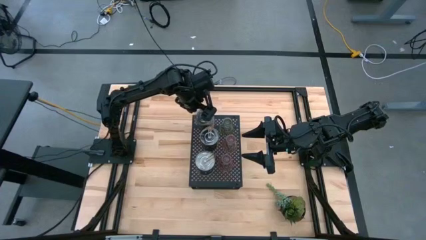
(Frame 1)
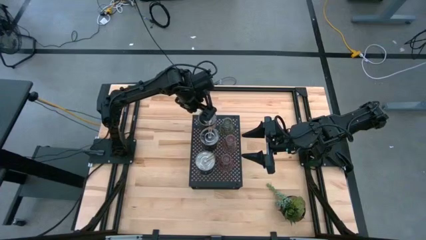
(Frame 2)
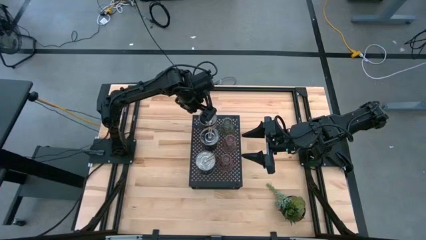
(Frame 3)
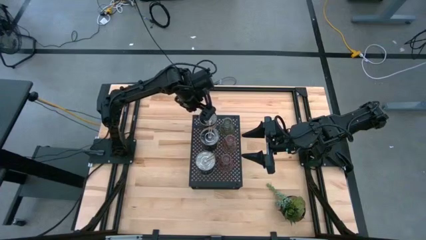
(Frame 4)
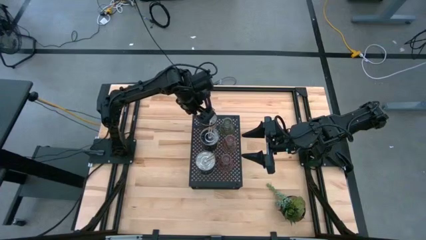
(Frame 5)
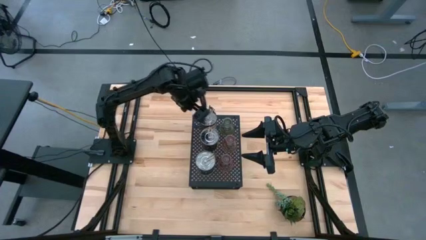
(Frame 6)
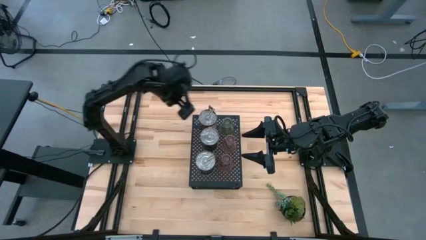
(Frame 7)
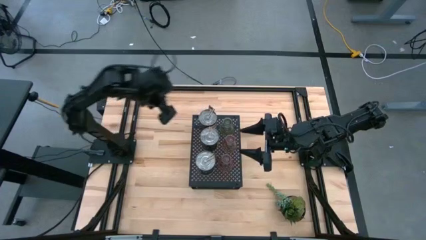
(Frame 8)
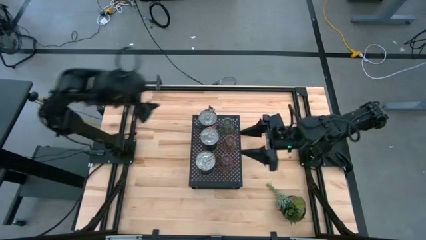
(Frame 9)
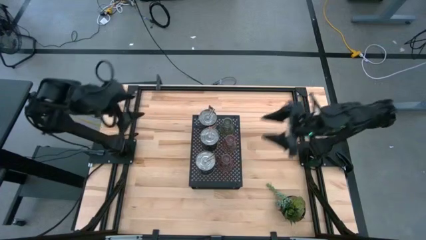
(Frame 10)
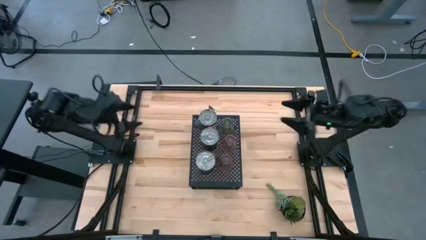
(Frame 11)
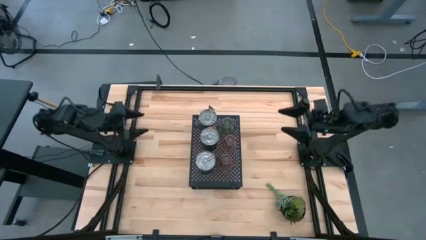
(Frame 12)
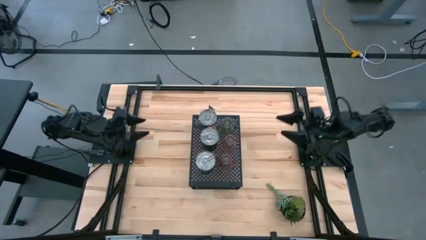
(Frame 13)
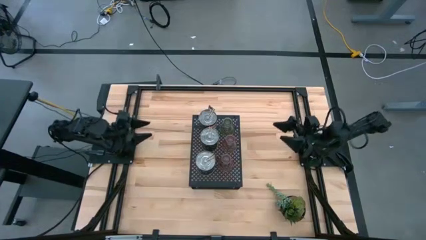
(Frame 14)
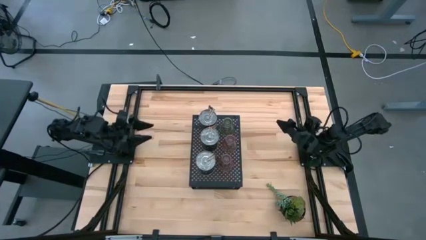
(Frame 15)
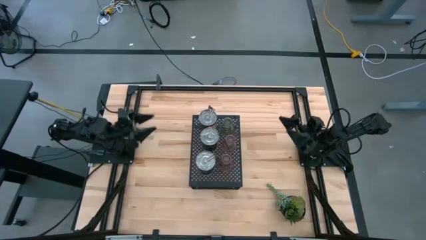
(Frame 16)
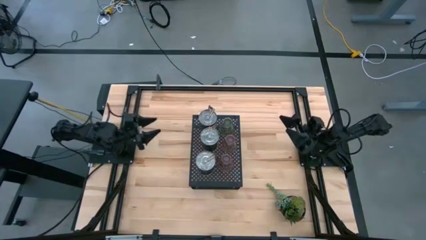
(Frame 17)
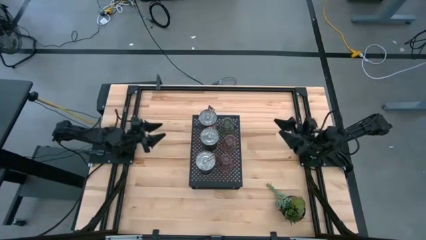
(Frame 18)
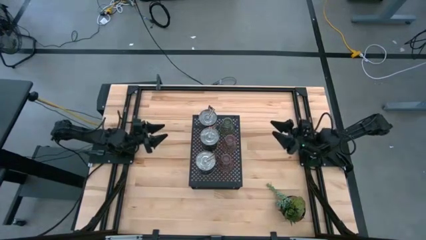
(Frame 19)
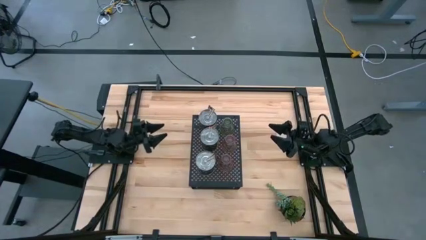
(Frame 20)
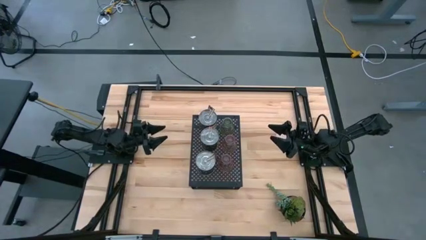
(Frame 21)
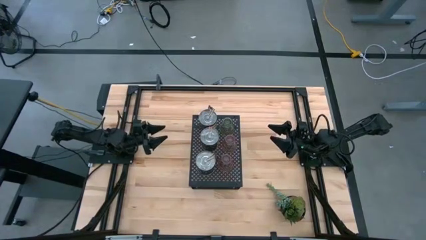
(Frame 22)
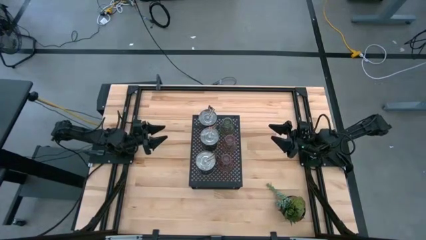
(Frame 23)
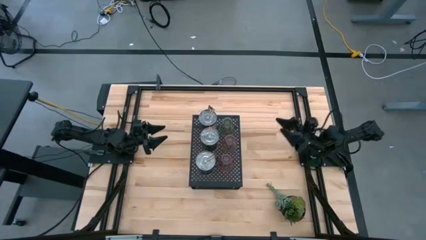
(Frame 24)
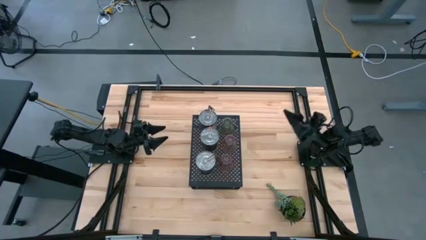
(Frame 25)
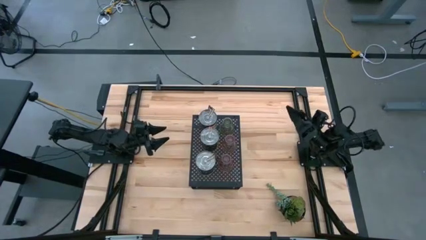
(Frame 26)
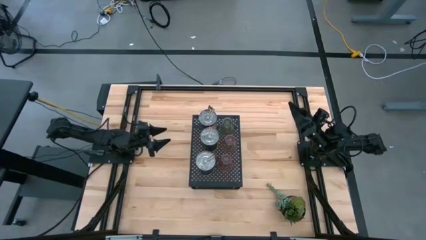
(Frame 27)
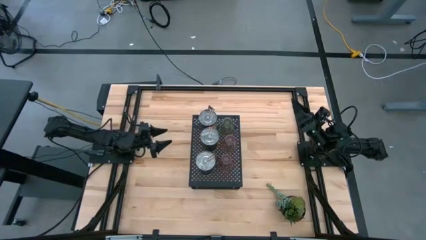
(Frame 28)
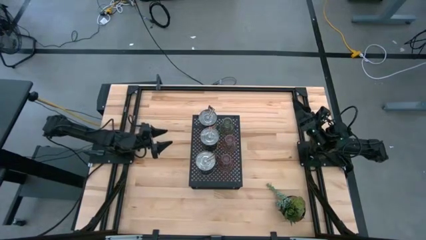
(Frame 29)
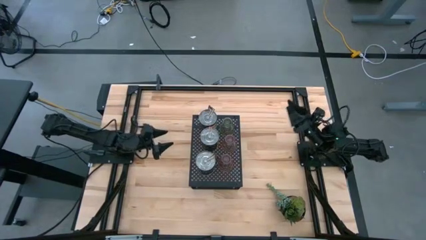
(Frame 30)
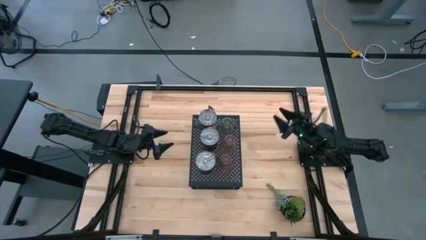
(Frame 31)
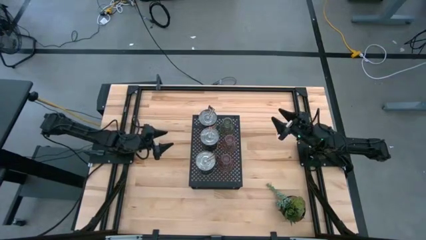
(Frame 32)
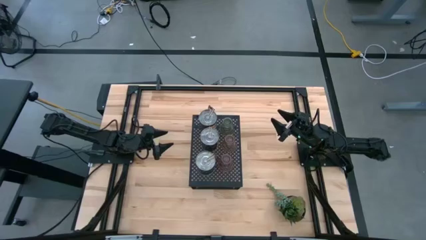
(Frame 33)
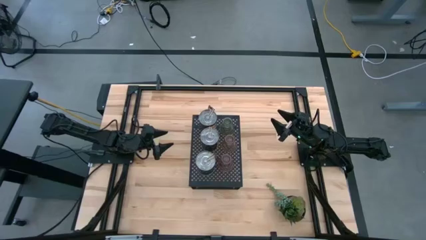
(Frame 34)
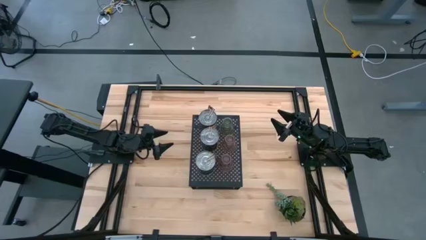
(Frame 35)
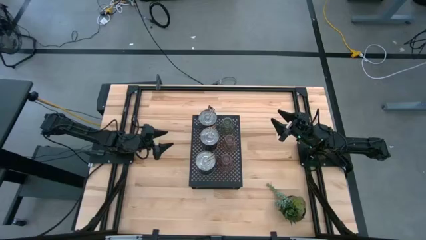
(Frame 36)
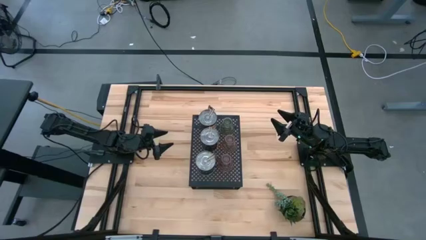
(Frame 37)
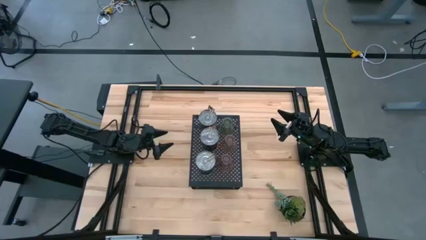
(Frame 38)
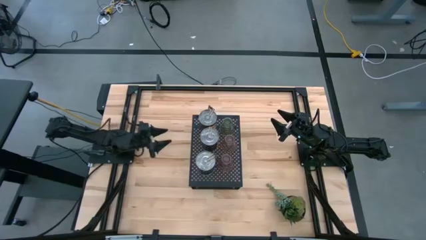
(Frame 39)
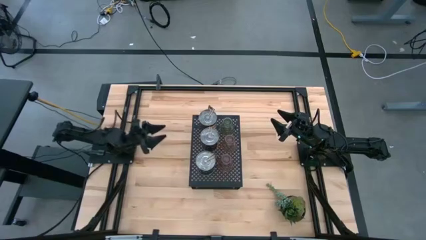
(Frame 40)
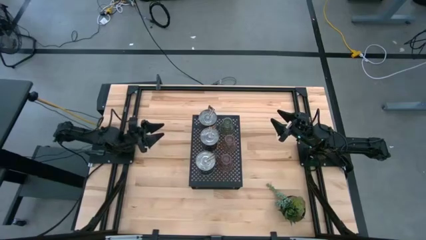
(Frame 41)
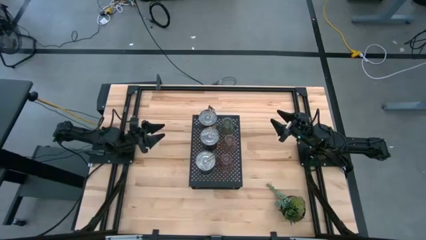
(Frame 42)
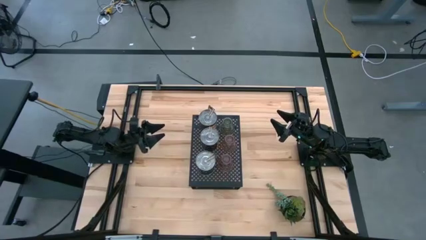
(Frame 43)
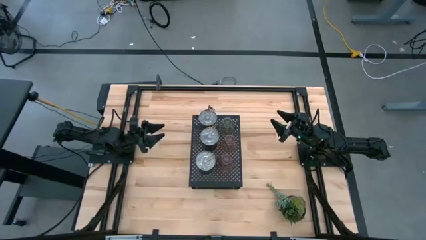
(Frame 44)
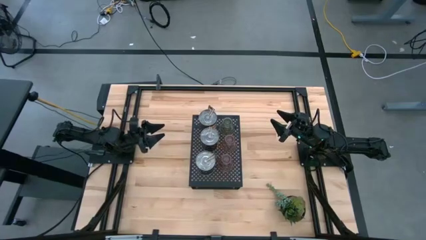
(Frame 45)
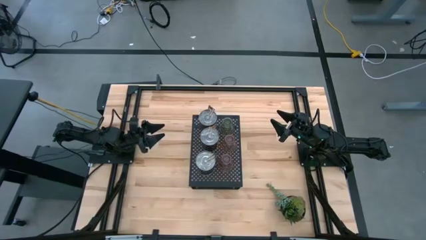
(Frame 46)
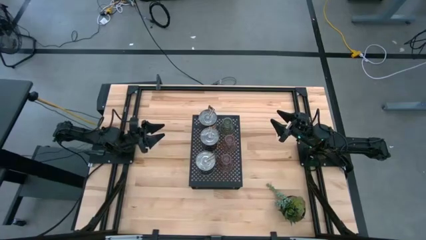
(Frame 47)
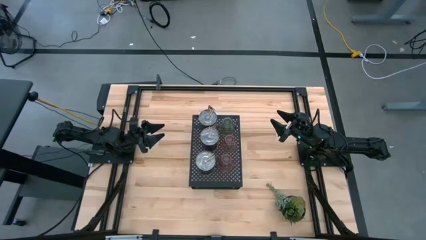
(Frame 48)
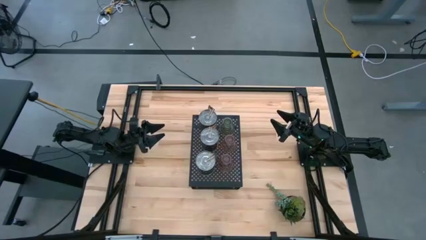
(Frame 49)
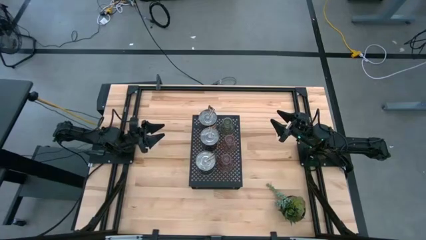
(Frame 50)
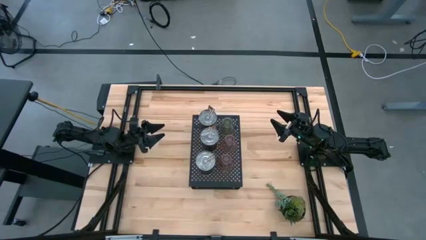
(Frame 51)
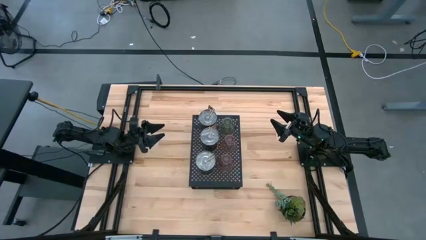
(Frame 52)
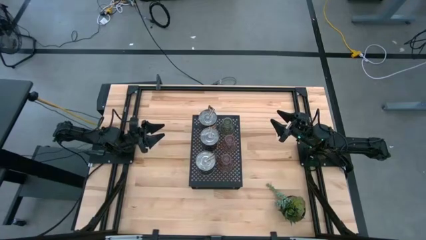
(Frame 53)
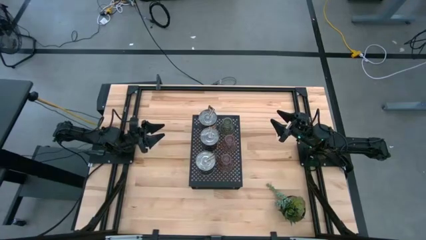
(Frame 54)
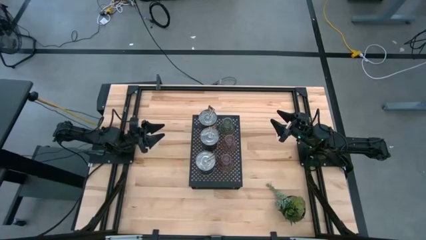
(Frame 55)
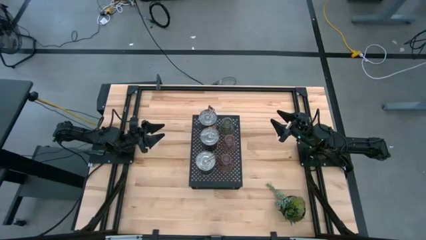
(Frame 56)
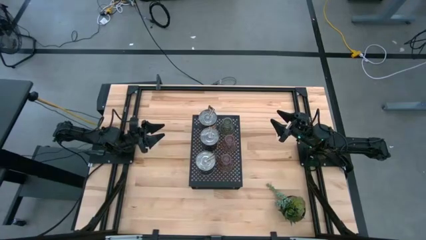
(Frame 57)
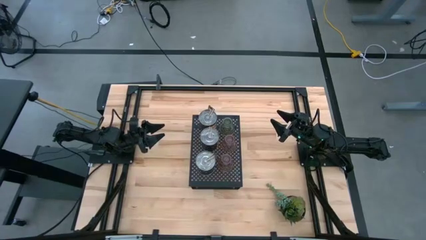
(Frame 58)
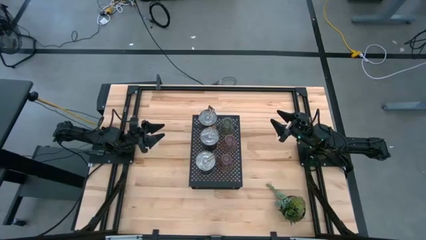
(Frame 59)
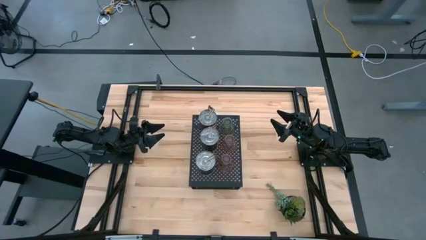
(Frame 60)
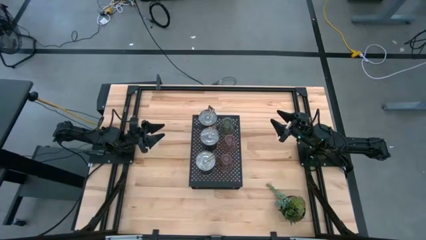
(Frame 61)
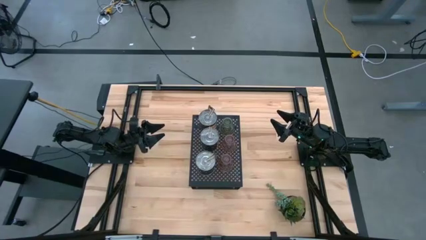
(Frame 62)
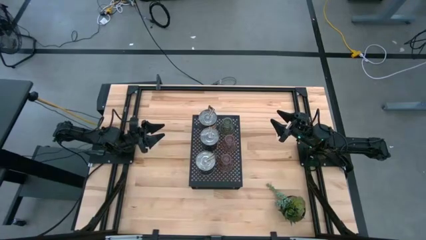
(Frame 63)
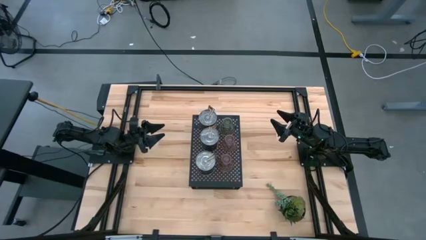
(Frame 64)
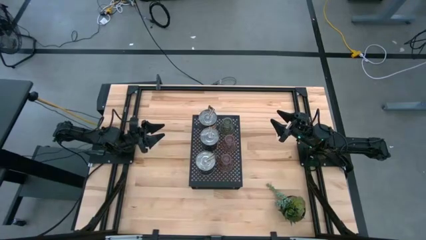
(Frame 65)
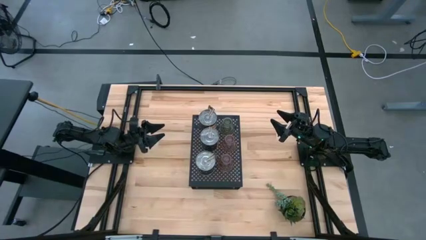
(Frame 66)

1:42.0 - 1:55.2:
Task: Pick & Place candle stick holders
Return to Home Position

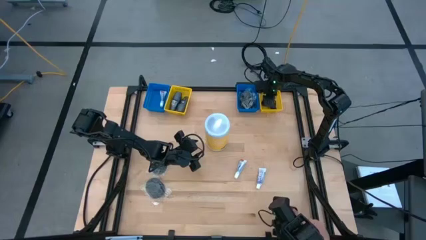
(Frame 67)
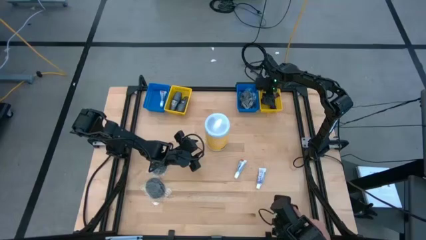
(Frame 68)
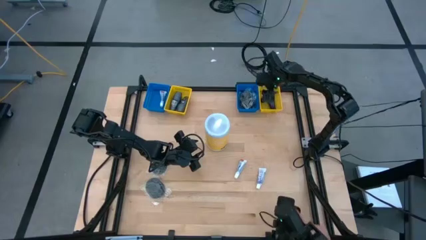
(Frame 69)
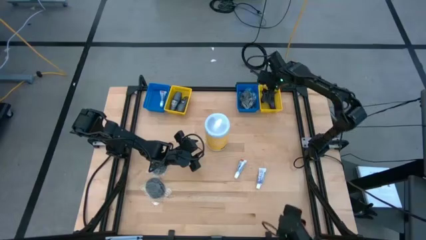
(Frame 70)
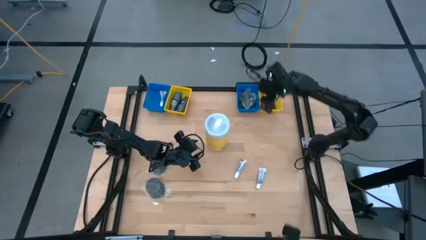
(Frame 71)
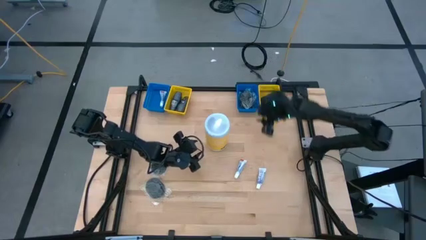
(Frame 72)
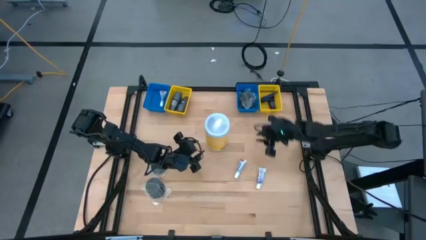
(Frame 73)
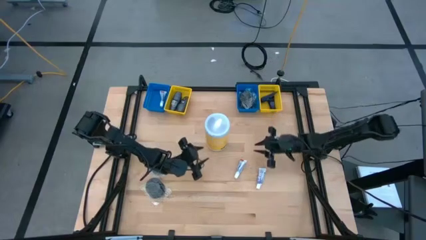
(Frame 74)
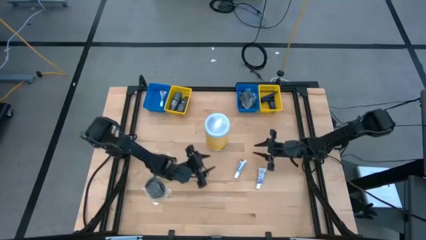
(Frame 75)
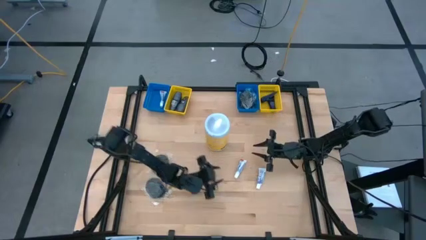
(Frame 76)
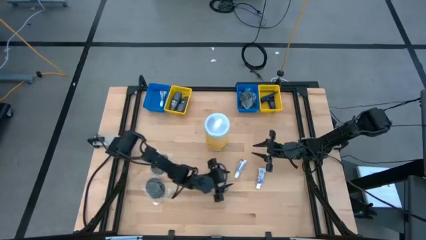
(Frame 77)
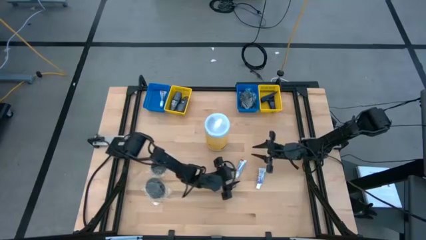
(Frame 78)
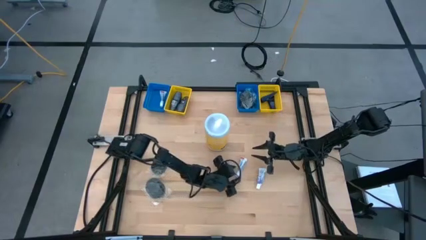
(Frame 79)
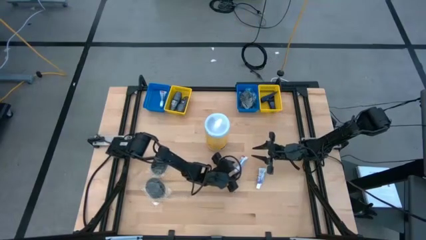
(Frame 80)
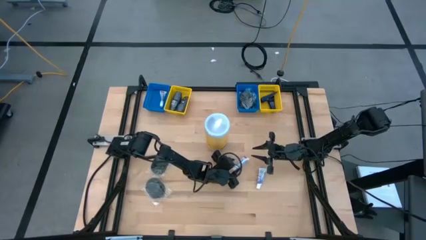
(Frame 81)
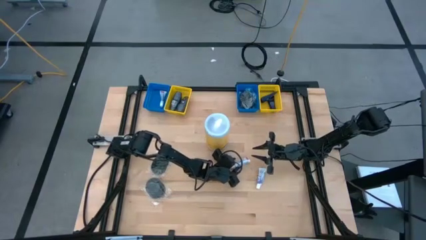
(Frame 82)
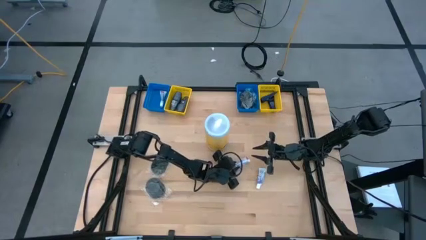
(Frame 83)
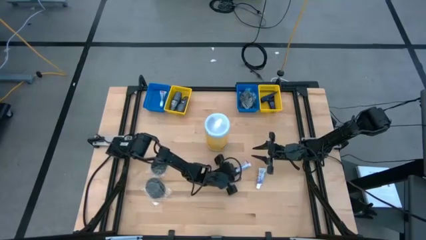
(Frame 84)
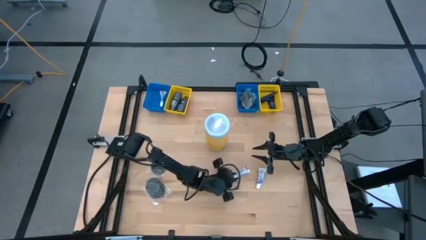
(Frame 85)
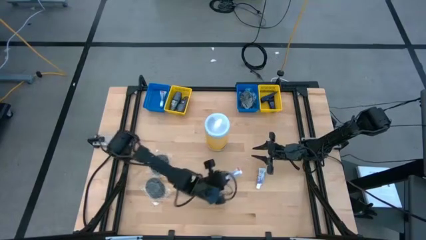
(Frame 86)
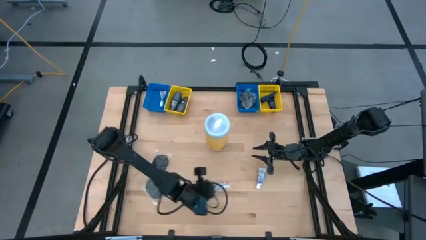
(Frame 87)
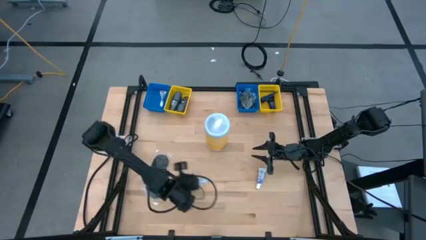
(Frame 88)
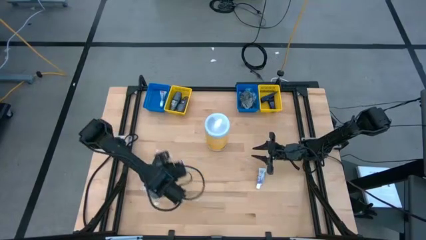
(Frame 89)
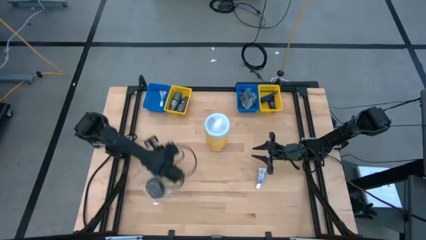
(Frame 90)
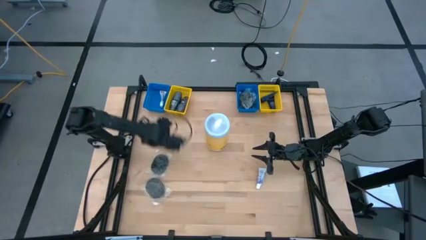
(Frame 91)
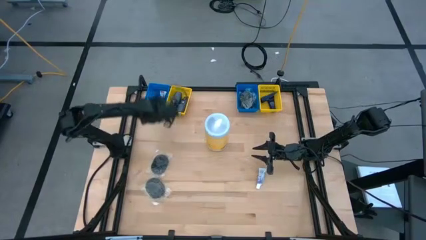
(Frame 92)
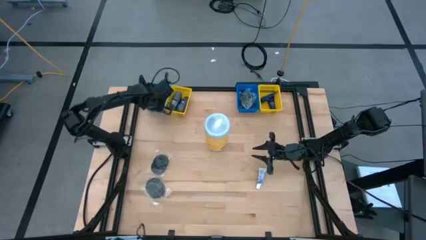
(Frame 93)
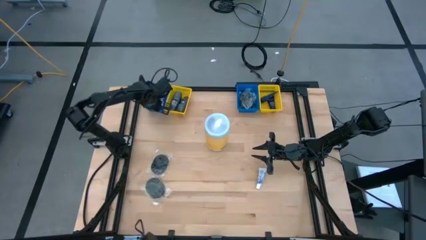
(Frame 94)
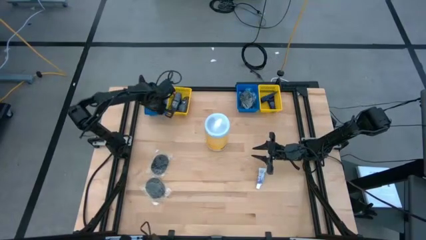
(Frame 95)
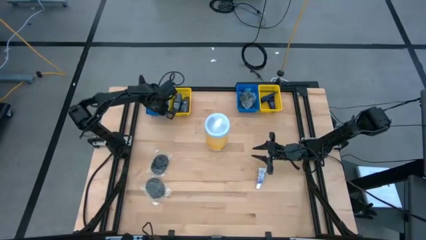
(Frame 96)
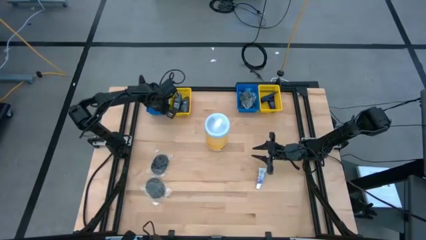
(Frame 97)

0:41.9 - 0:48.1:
Task: Pick & Place Travel size toiletries
Put the left toothpaste into the left blue bin
